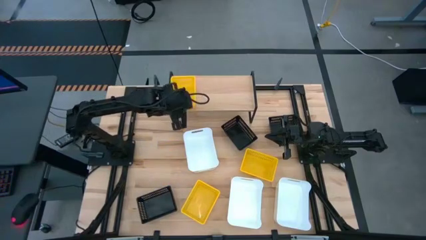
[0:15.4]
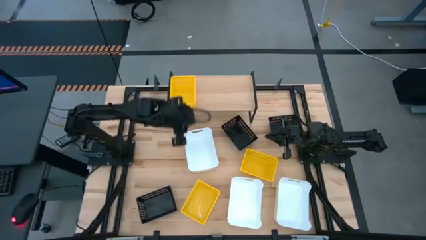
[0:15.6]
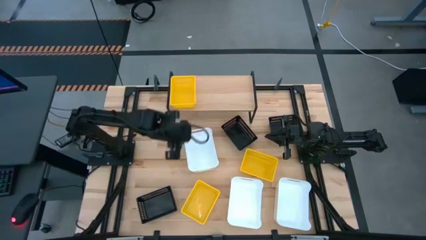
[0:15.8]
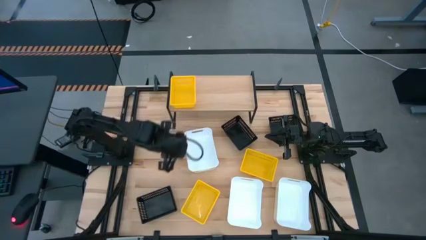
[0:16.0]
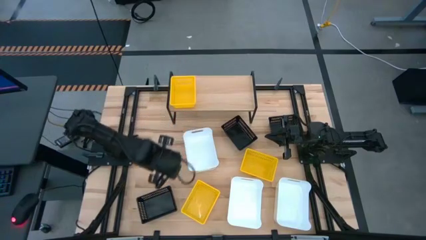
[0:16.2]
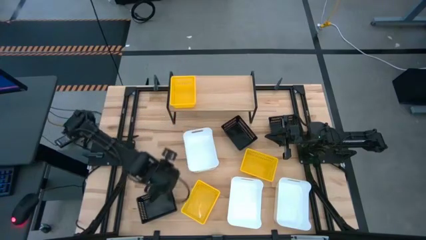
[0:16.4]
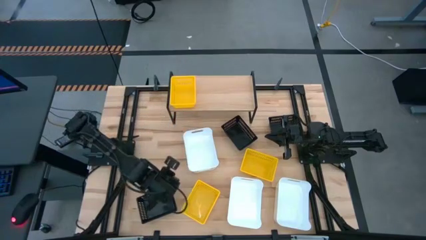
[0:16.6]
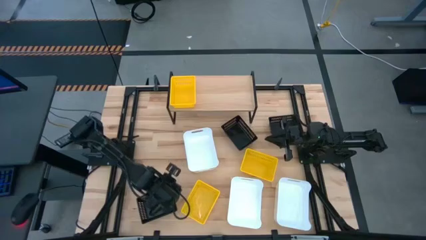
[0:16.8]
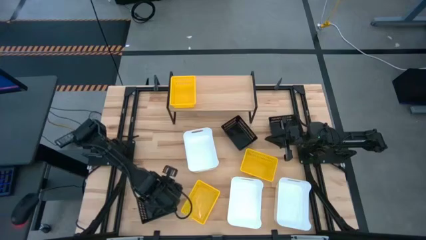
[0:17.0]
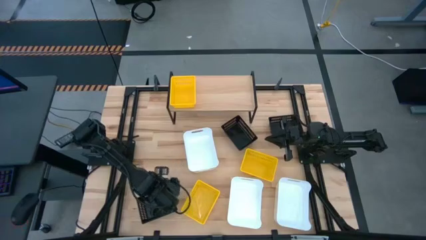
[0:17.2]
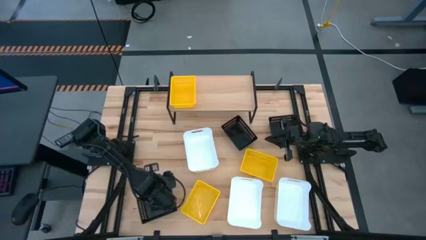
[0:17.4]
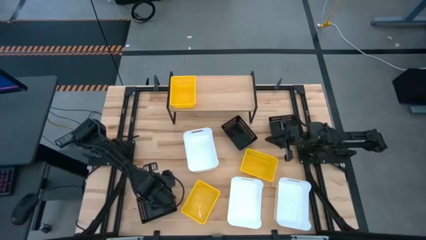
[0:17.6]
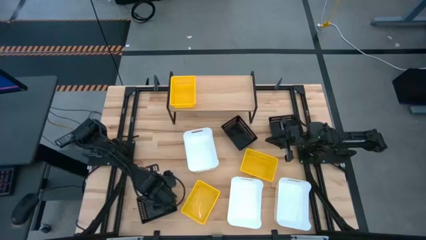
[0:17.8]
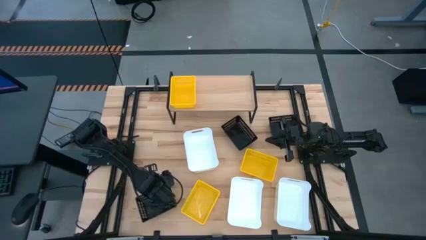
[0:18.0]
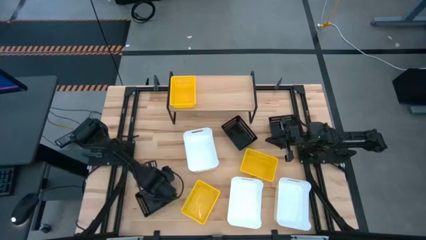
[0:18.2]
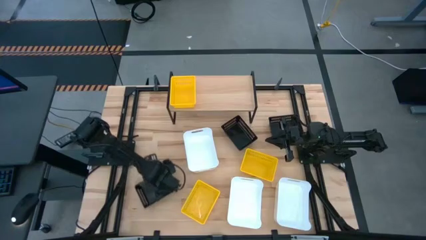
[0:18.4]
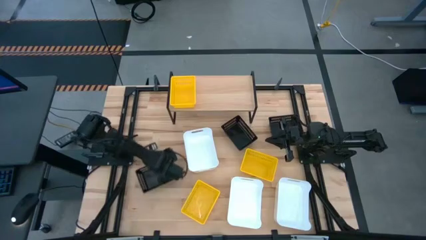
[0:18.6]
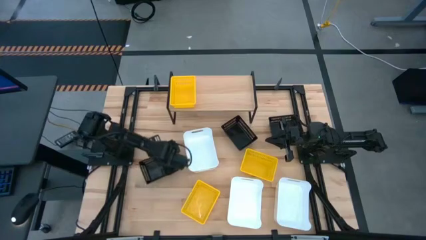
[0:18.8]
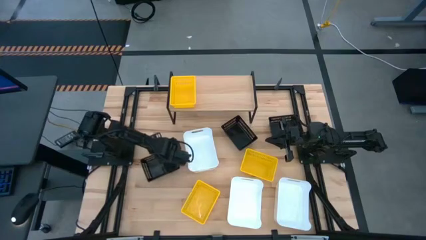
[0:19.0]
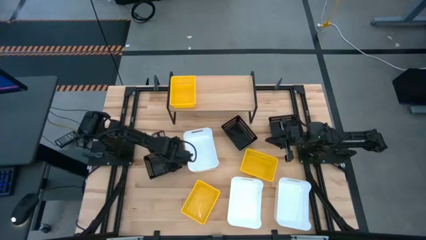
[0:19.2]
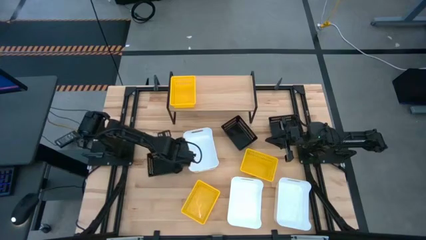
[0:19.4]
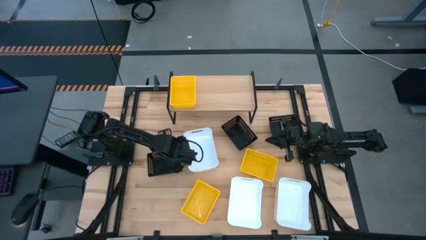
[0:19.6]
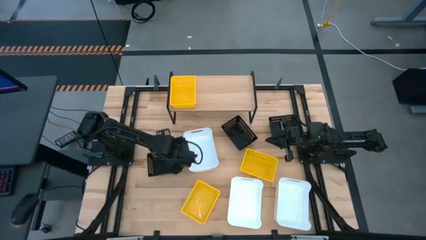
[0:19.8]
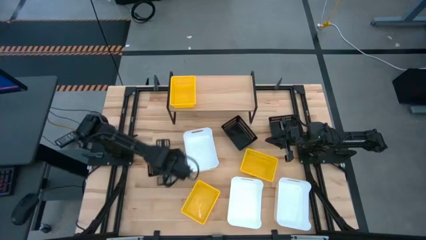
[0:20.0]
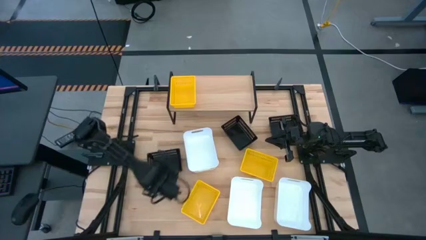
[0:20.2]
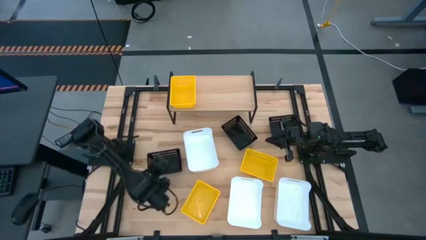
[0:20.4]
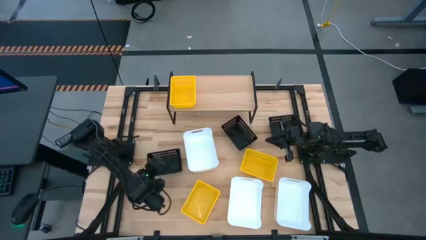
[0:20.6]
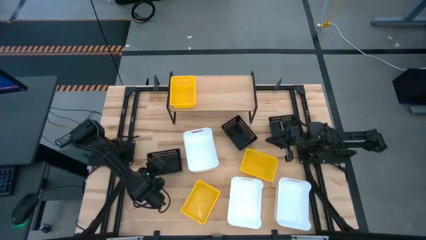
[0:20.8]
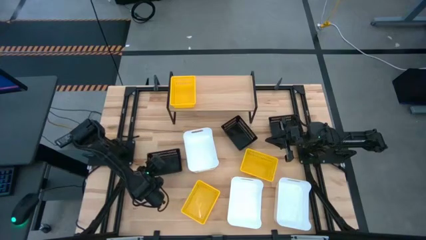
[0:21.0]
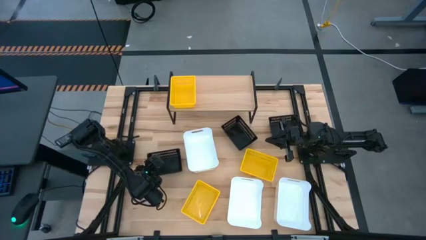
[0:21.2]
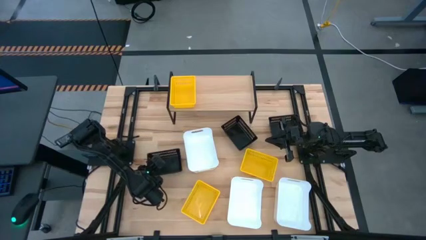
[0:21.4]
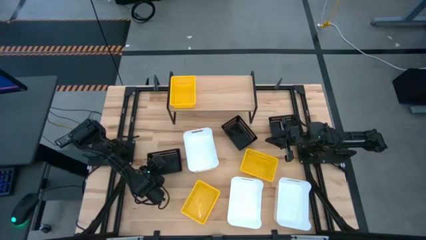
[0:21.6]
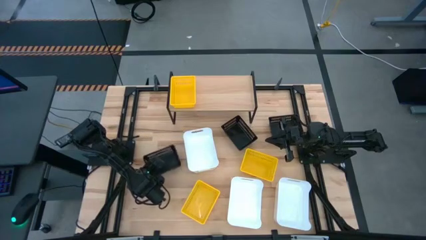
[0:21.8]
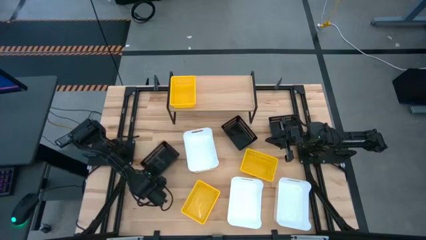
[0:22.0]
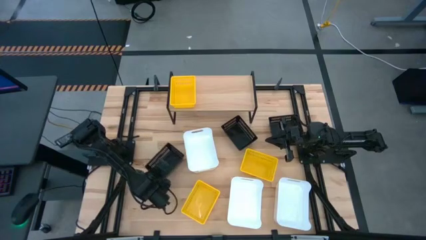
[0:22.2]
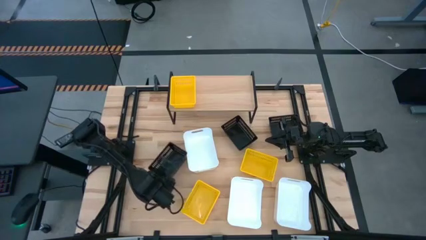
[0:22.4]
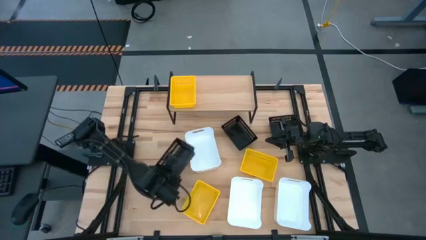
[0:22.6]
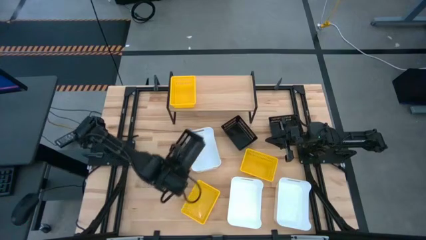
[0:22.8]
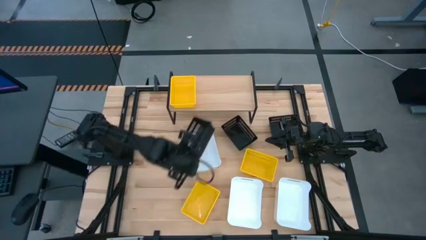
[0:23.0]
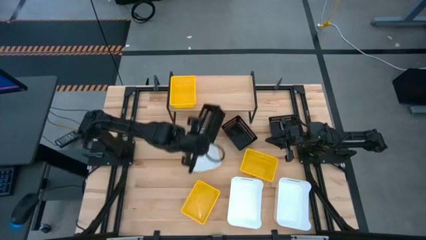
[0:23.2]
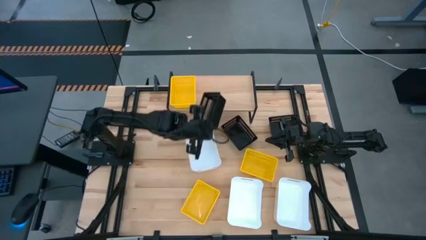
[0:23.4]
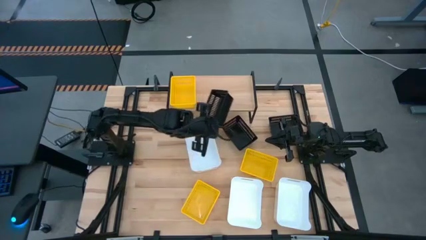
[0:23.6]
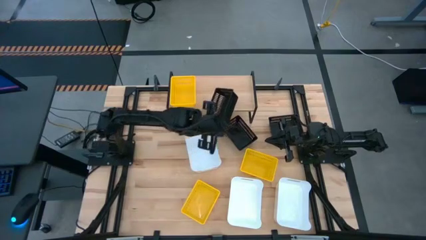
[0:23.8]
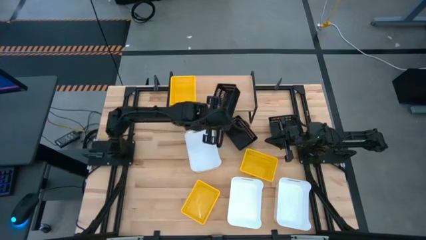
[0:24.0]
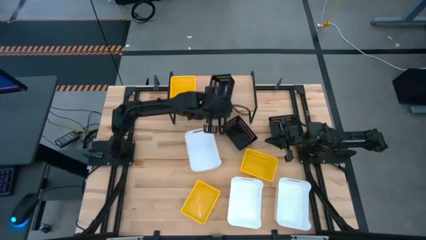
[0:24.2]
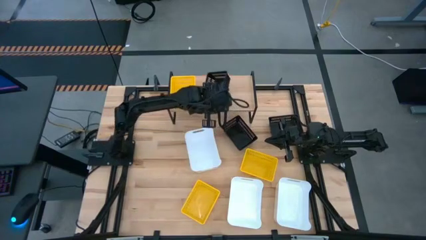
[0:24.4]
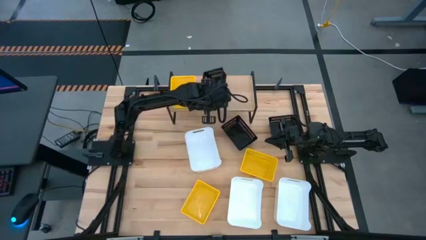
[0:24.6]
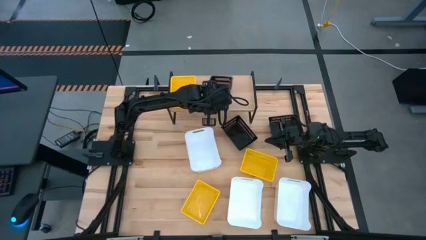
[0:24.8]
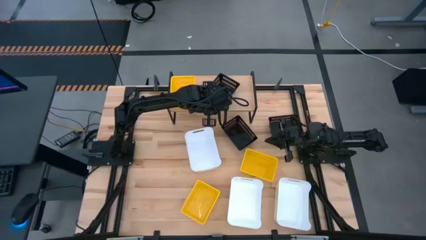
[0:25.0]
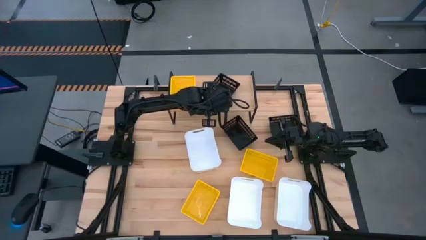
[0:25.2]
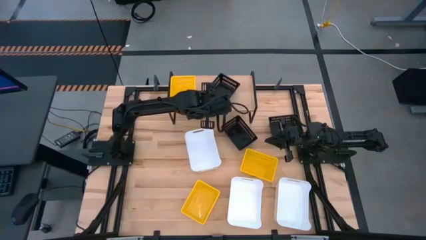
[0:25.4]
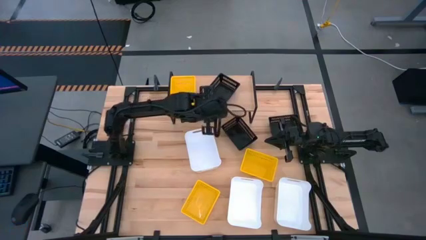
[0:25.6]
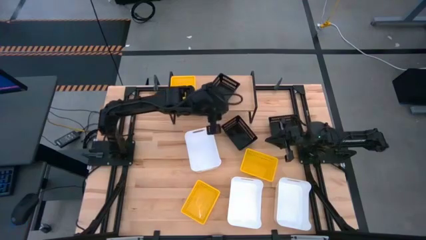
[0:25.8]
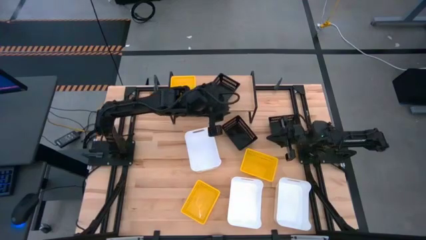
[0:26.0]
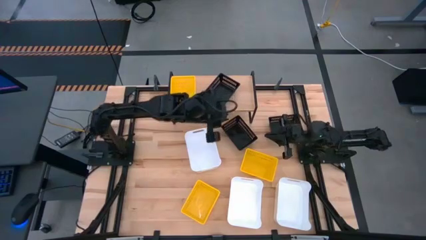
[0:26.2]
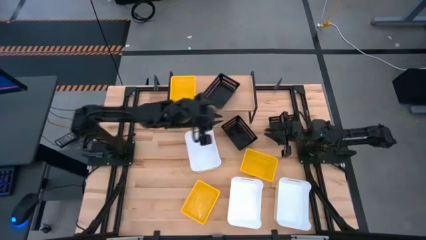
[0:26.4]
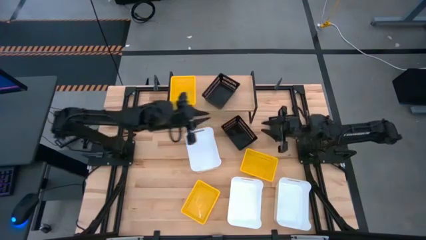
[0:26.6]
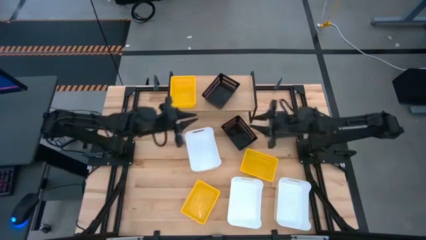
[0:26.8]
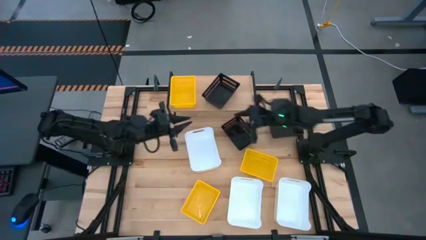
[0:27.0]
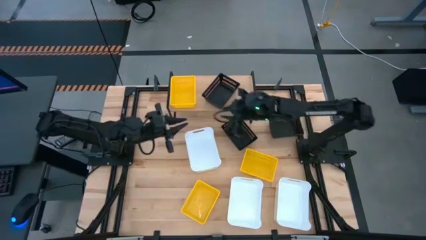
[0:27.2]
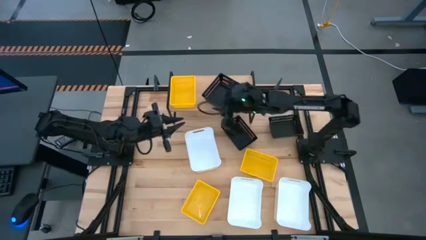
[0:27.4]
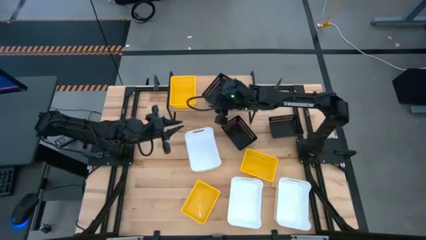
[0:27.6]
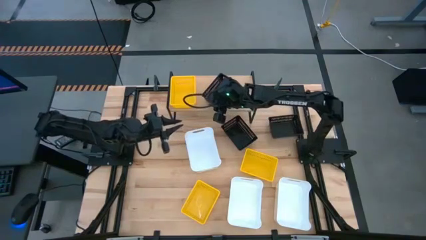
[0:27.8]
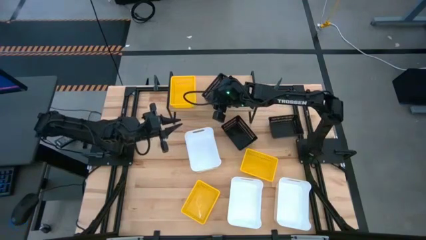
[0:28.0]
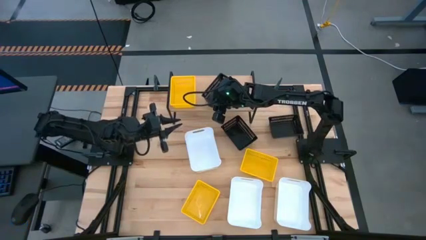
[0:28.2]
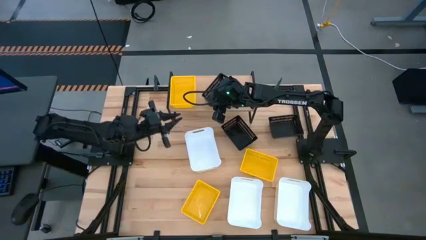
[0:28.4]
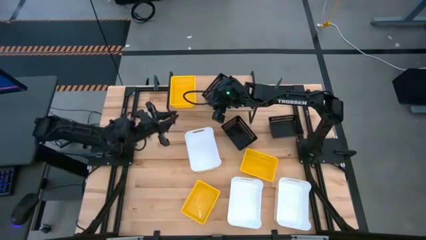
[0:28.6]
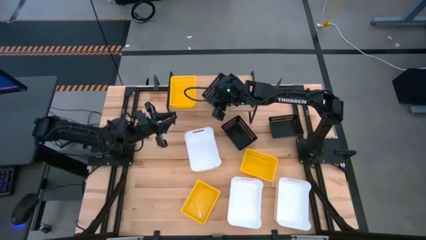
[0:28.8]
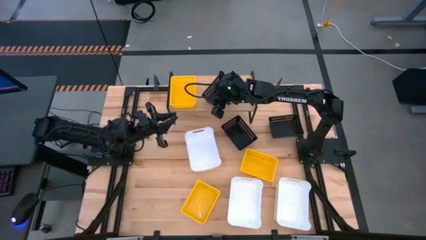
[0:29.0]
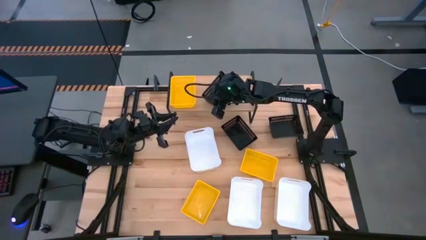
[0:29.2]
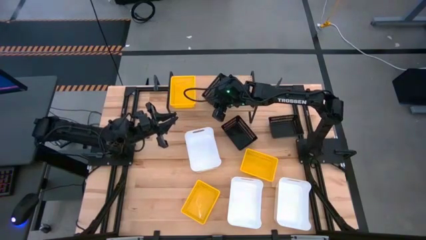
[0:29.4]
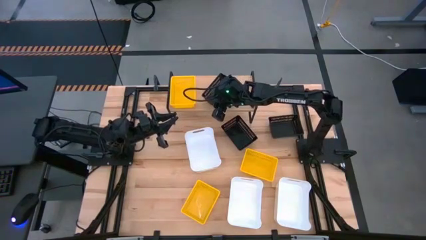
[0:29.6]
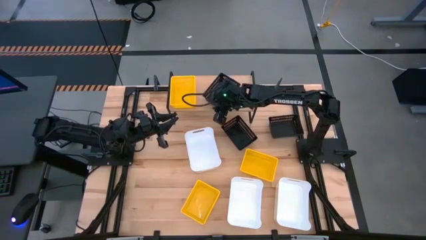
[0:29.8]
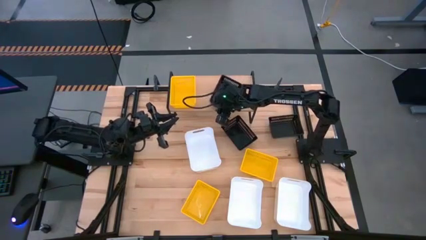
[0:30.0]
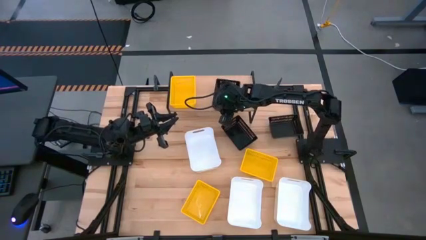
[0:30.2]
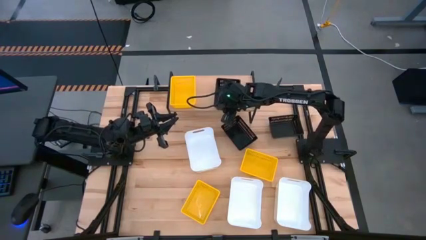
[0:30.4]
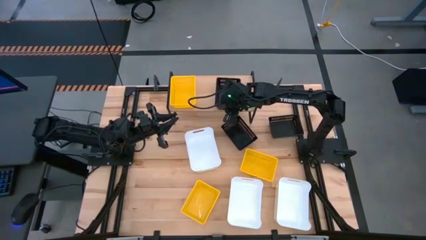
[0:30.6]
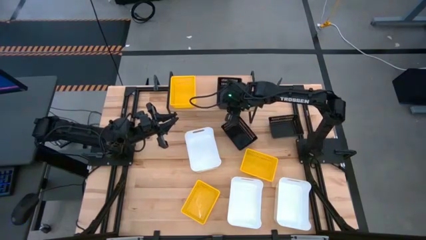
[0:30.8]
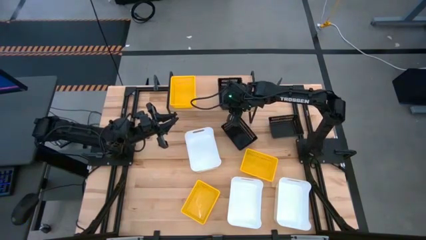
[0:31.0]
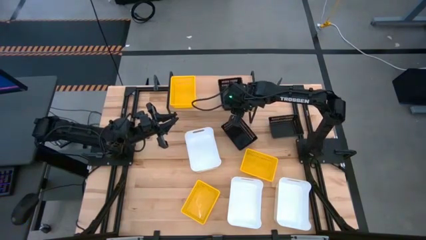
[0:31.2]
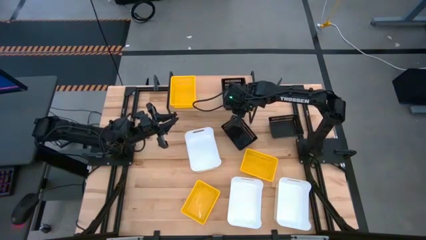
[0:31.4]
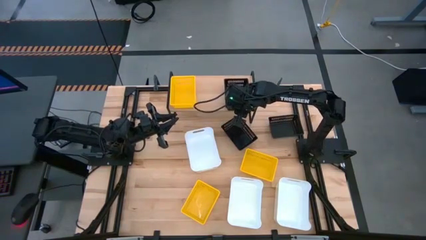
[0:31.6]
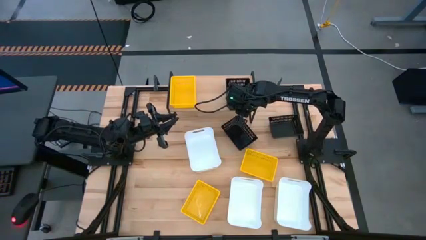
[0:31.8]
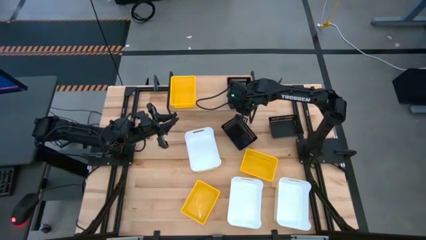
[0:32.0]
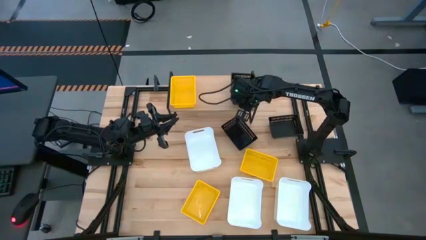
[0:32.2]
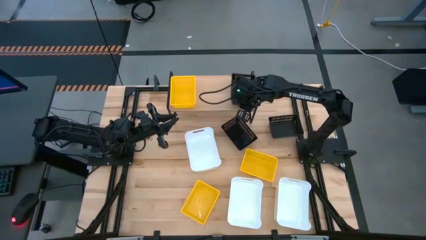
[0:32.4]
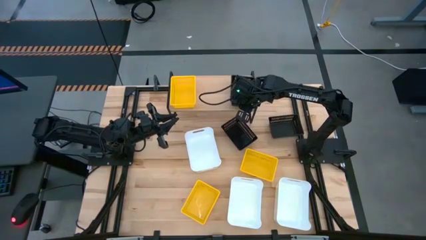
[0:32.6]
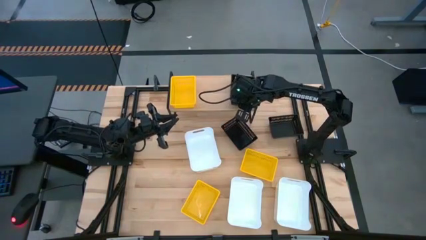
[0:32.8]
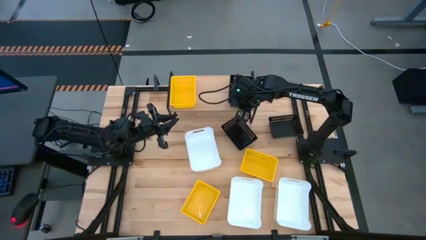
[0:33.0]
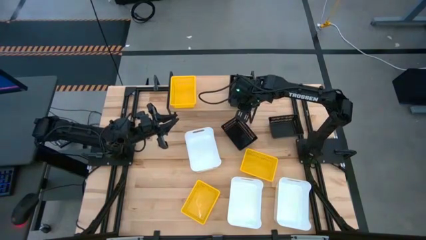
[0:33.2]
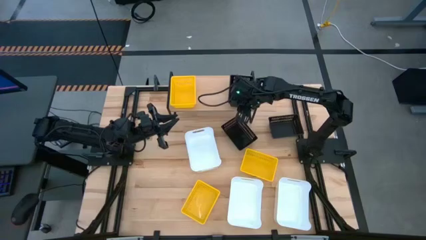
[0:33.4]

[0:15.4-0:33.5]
Task: Stack baskets on shelf by color
Put the bottom black basket on the shelf
